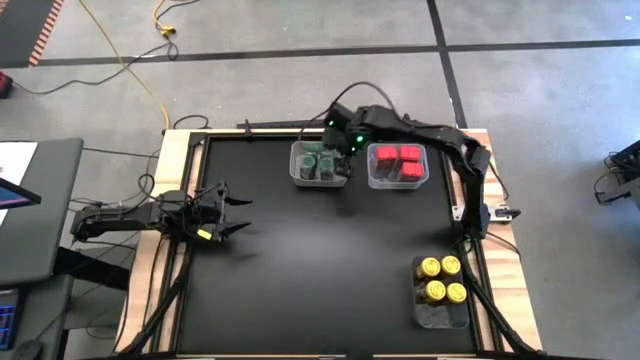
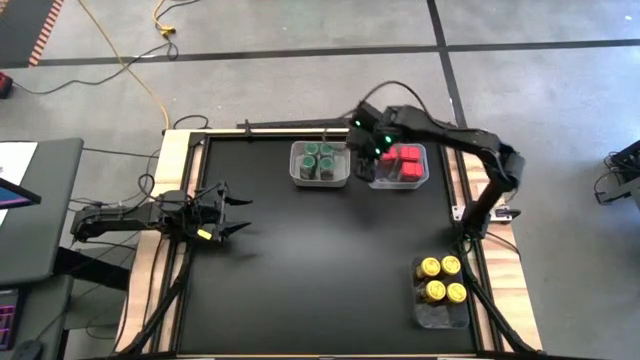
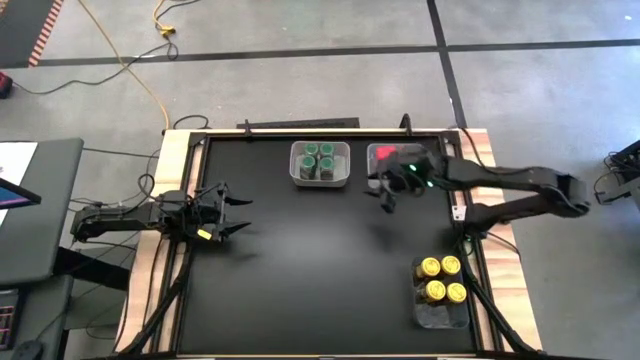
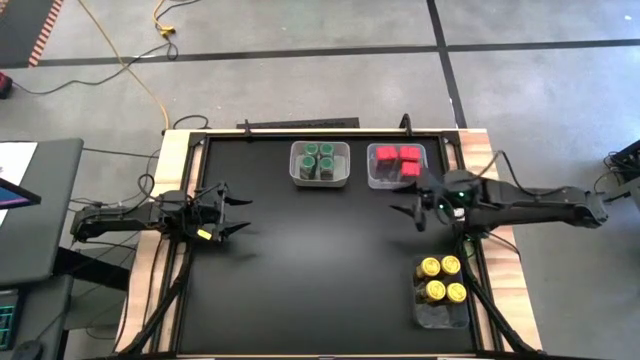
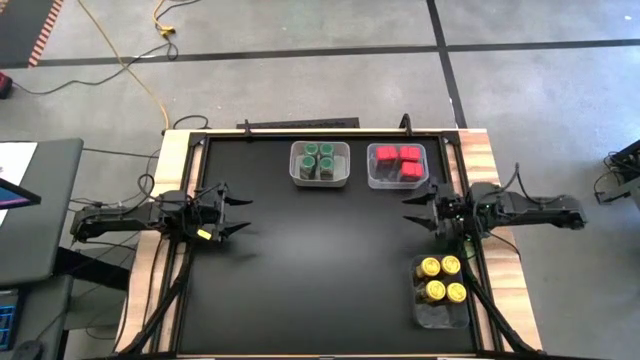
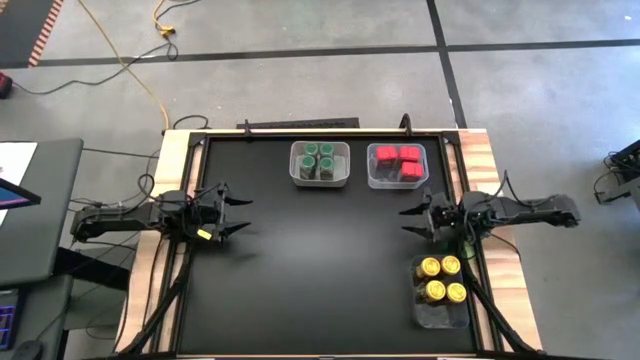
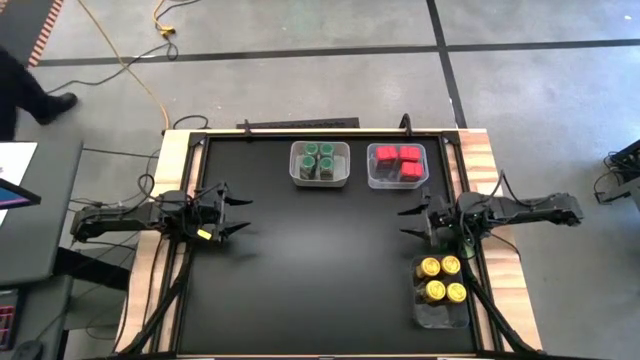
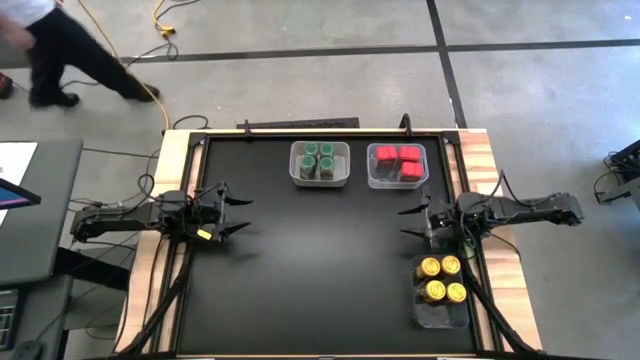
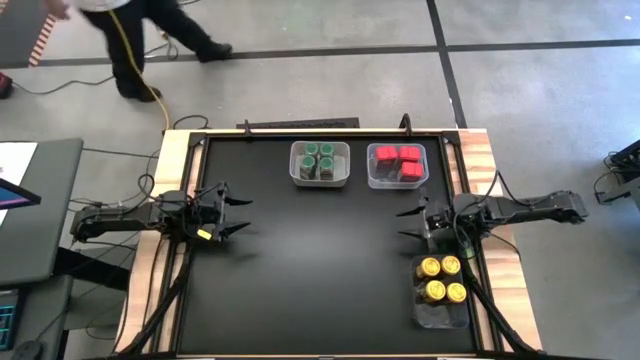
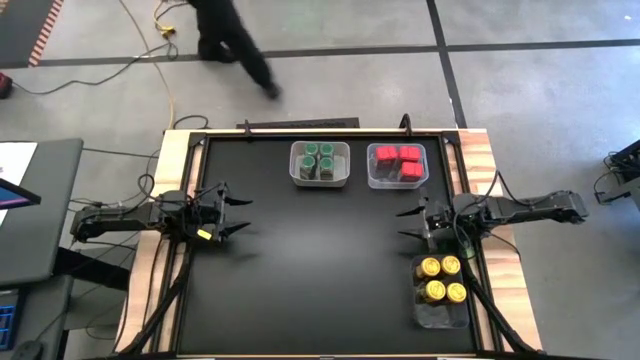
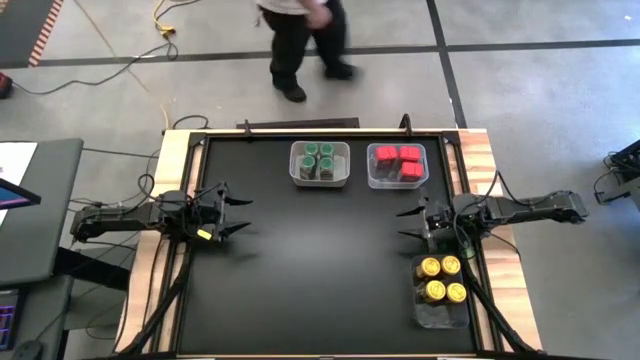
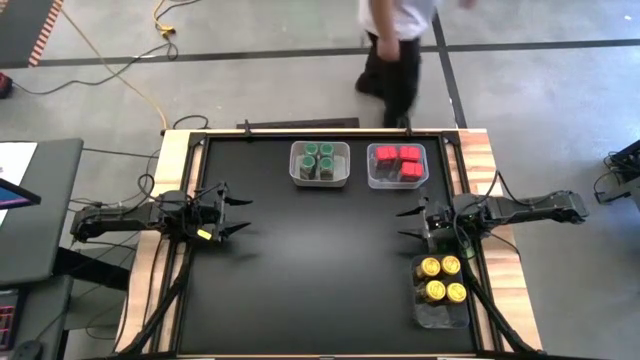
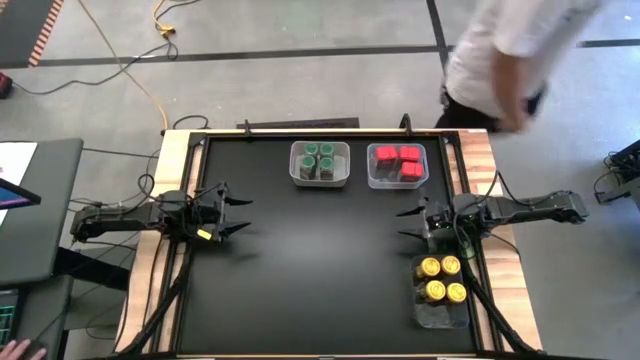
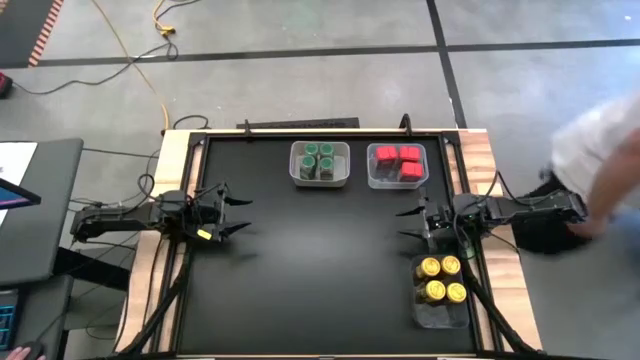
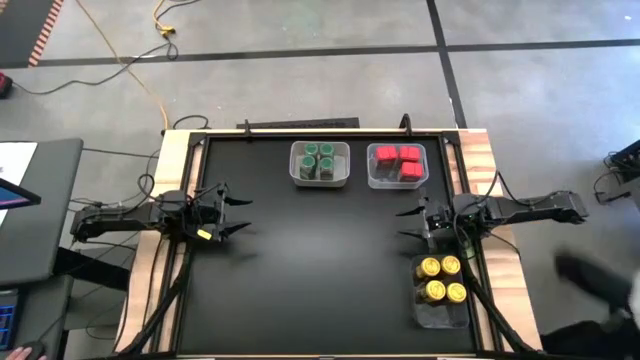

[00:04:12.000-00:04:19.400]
Task: Sort spices by type
Return to Home Position

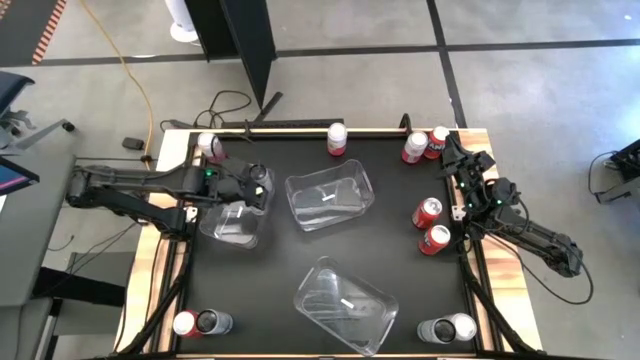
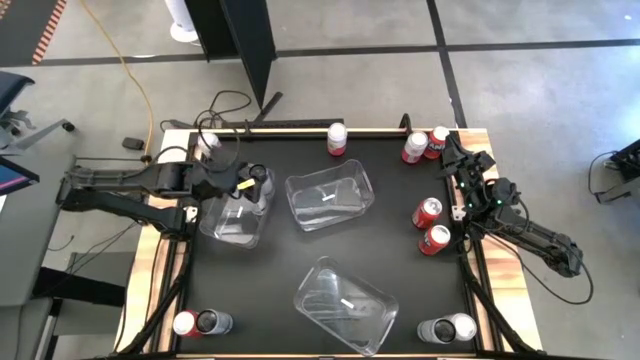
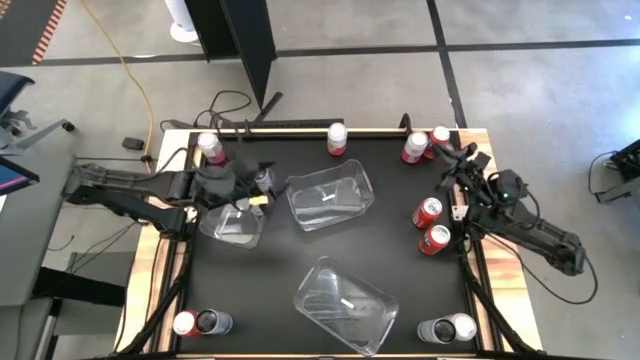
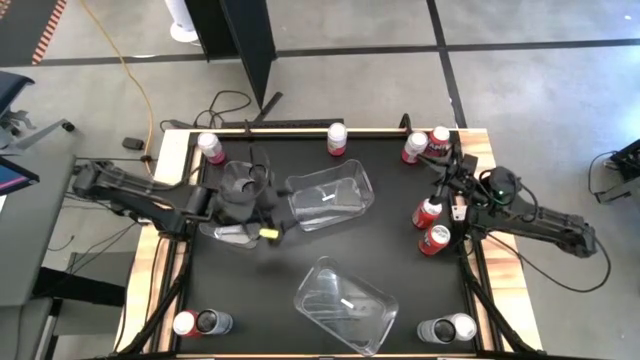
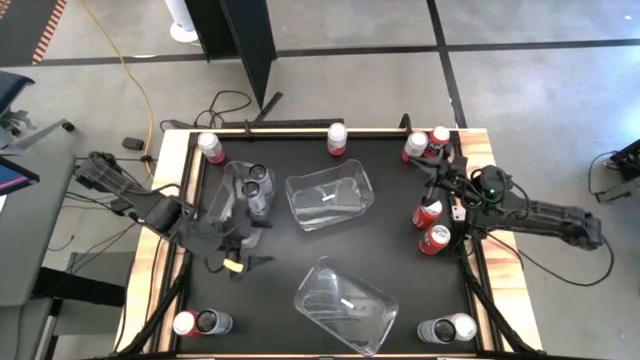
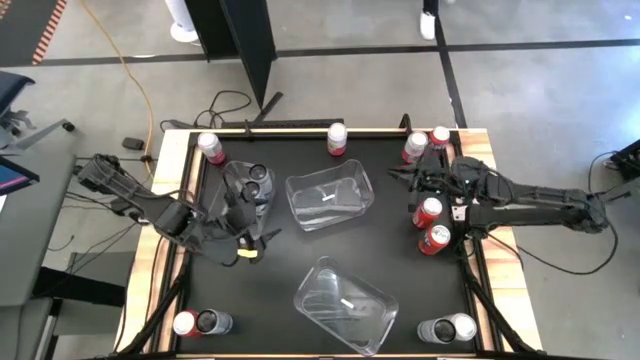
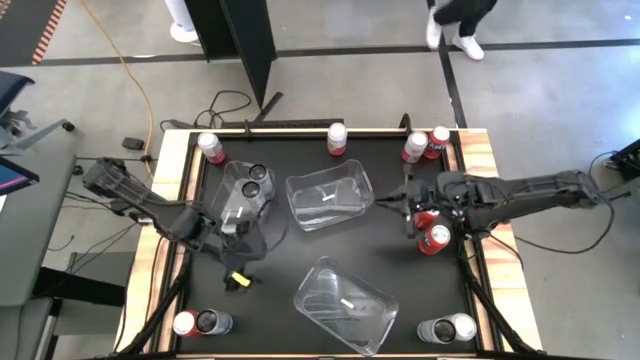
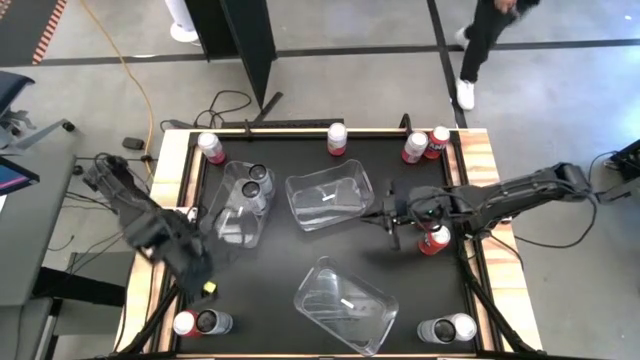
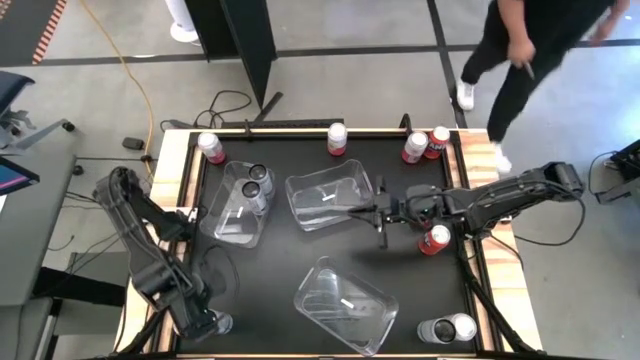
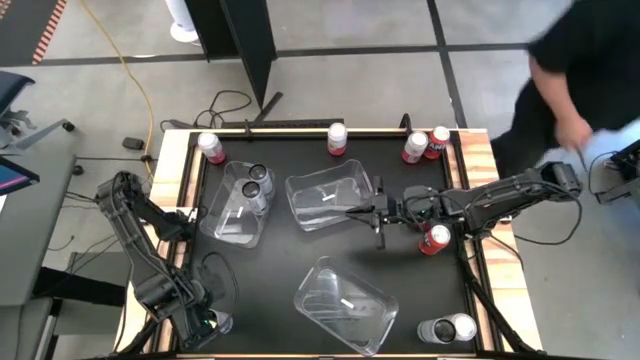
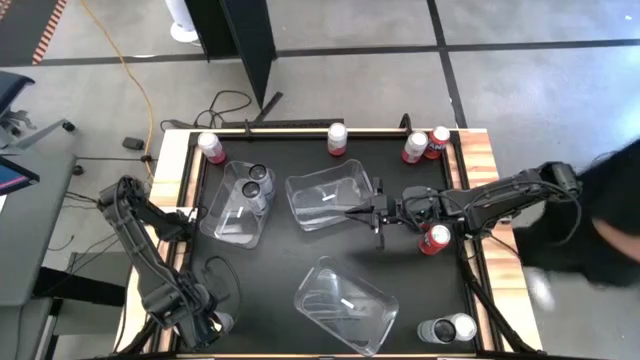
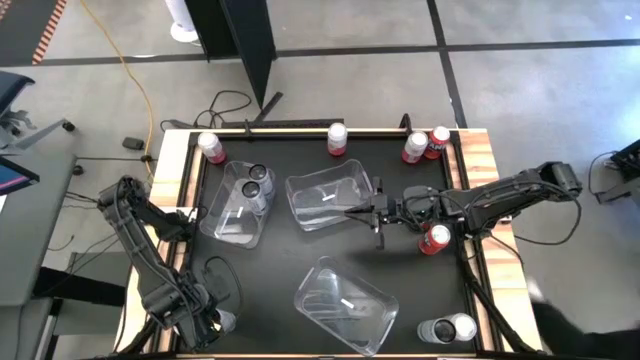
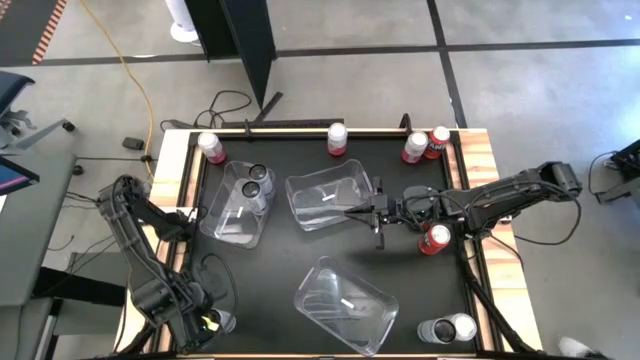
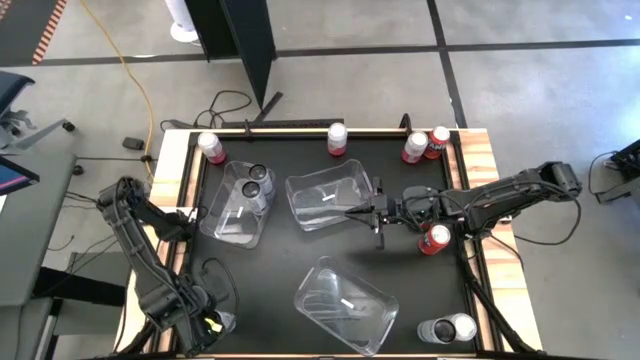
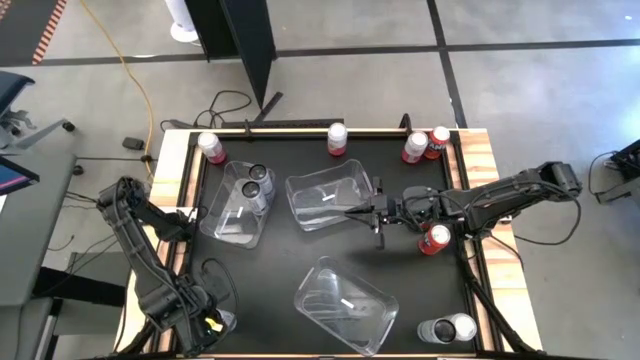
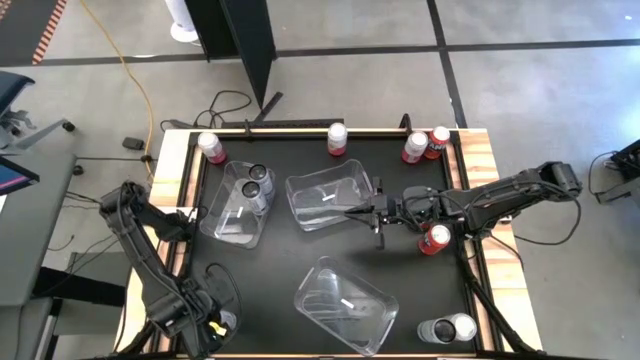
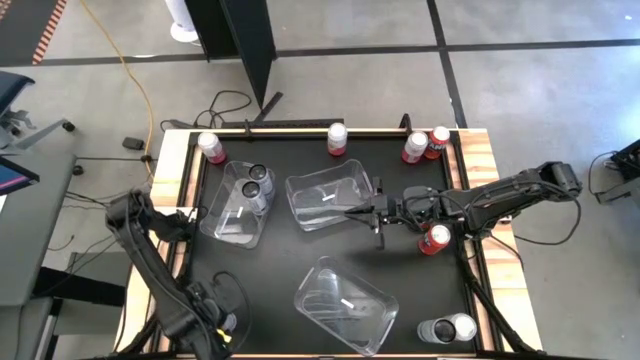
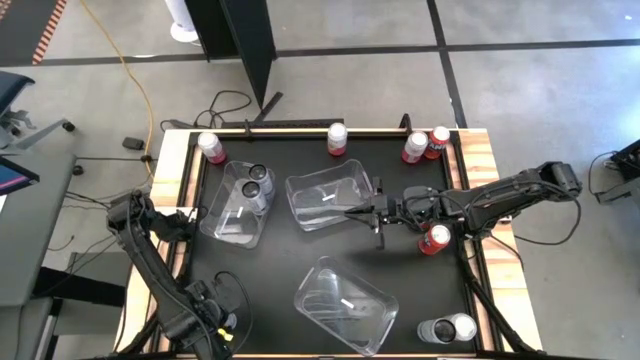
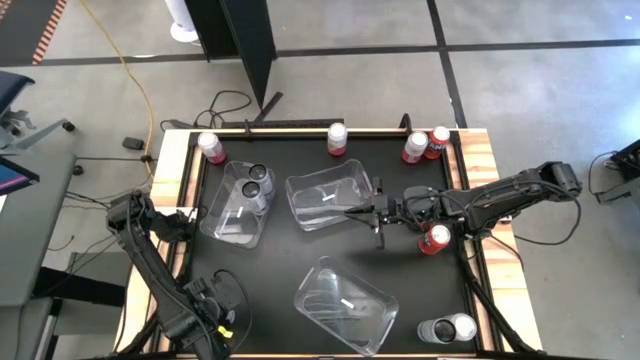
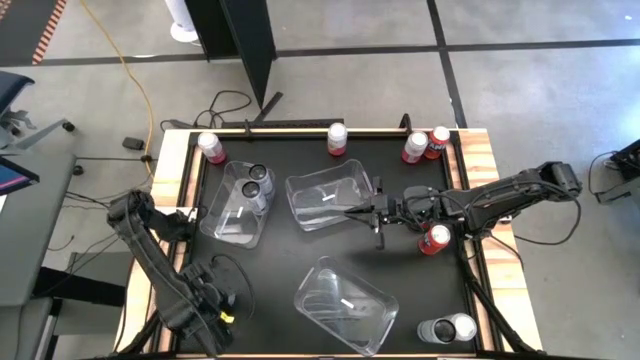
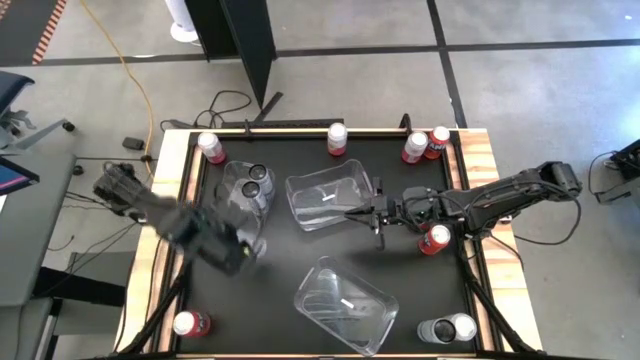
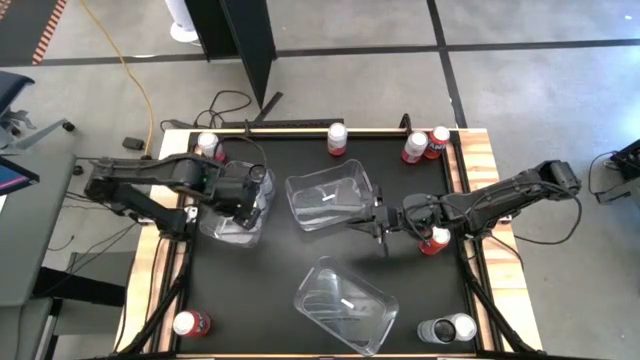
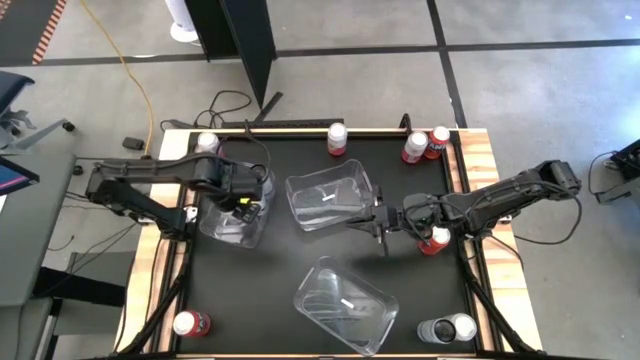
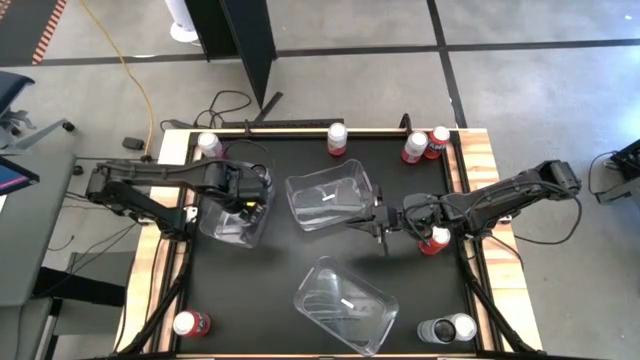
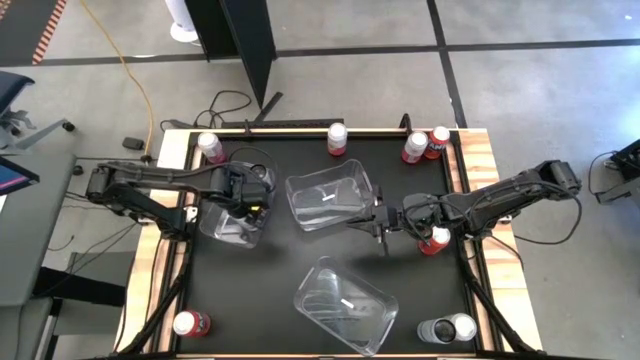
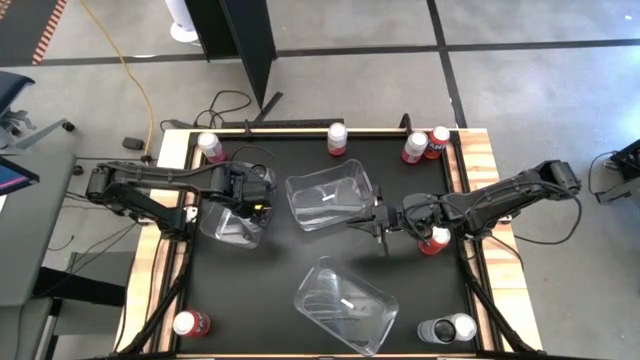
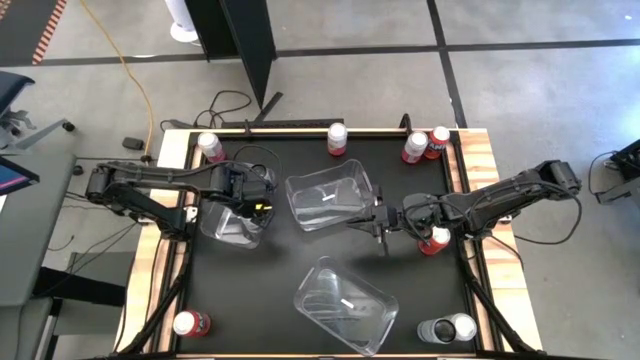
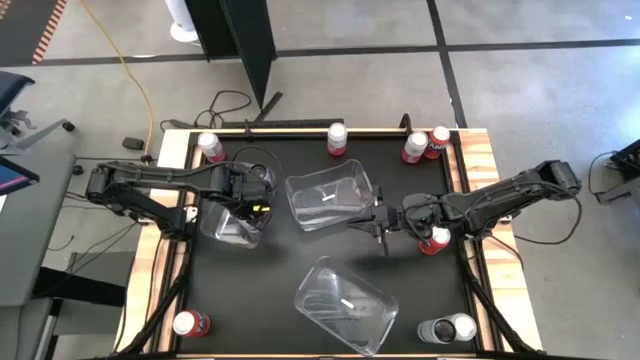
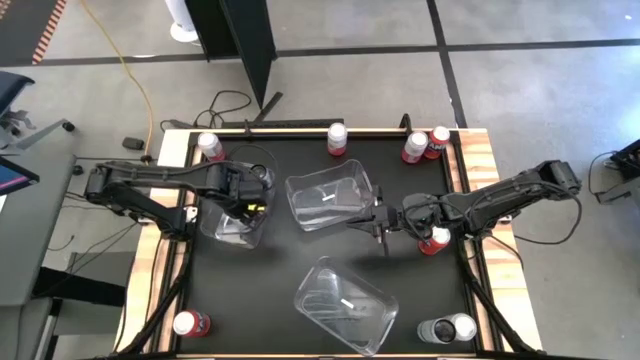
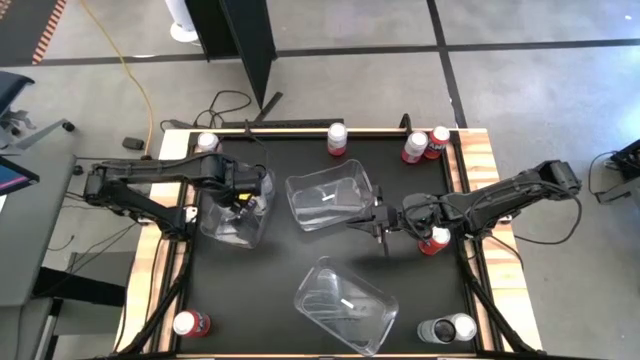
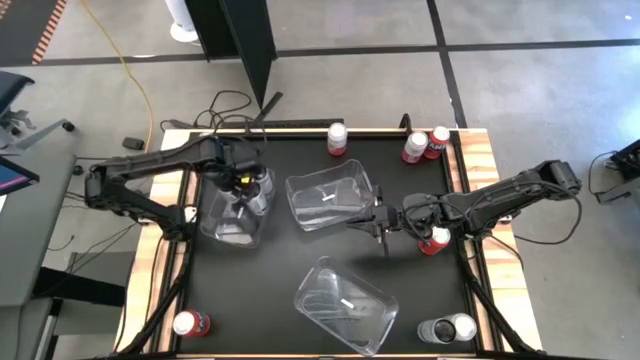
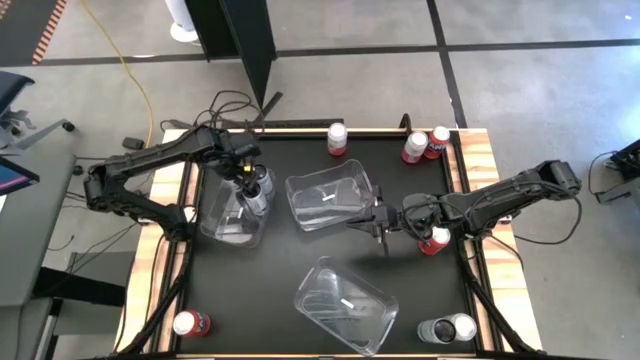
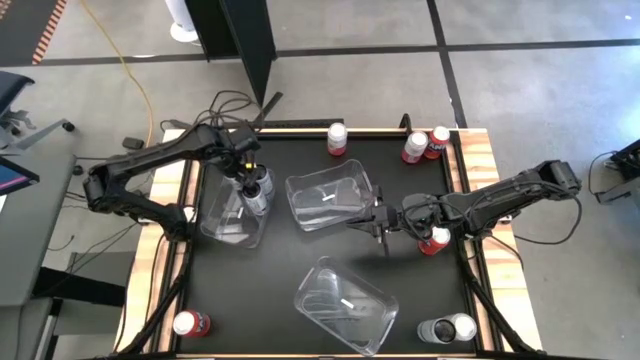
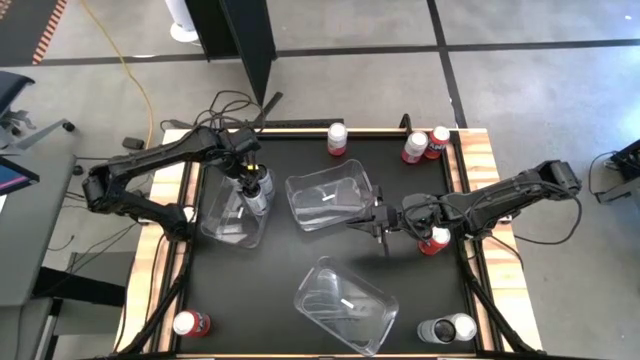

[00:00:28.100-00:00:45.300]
Task: Sort soda cans
Put the left black soda can in the top left transparent bin
